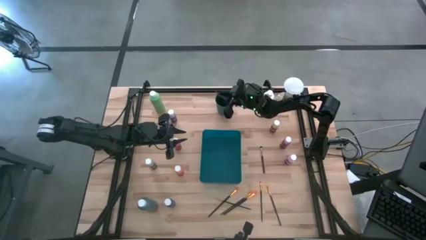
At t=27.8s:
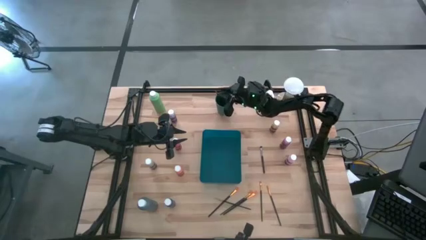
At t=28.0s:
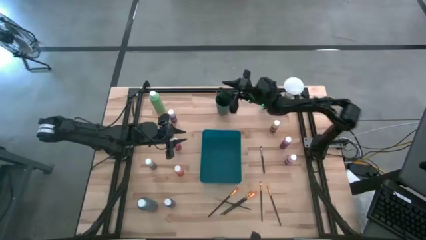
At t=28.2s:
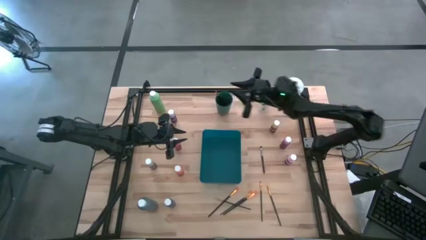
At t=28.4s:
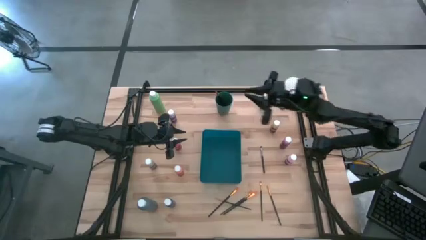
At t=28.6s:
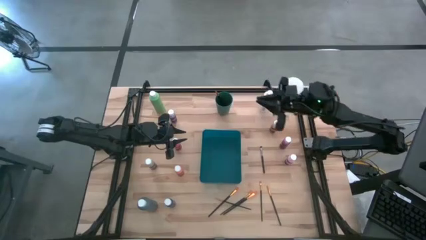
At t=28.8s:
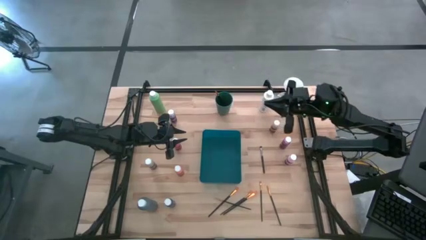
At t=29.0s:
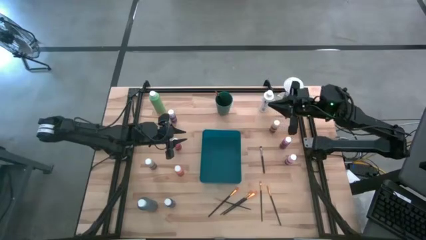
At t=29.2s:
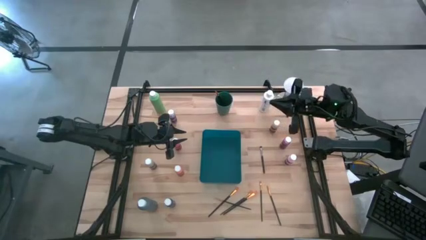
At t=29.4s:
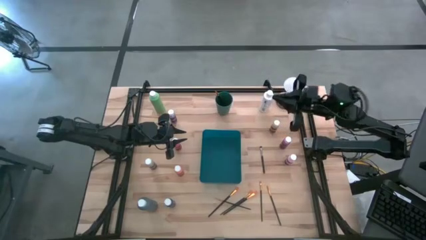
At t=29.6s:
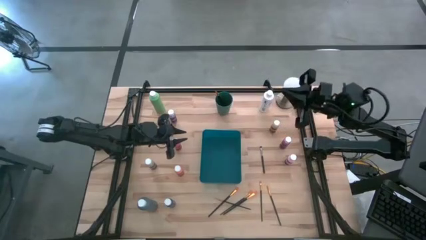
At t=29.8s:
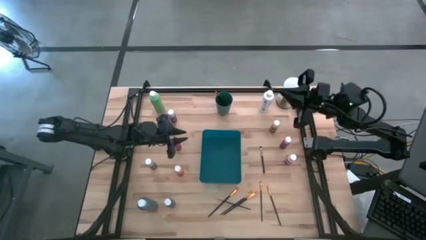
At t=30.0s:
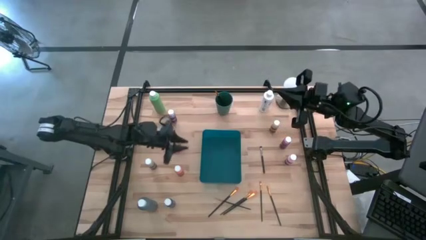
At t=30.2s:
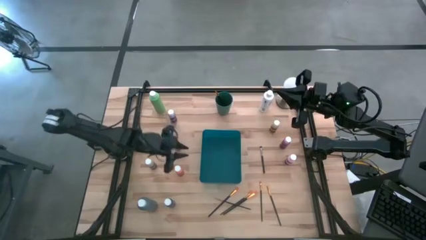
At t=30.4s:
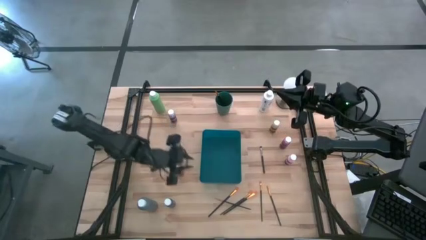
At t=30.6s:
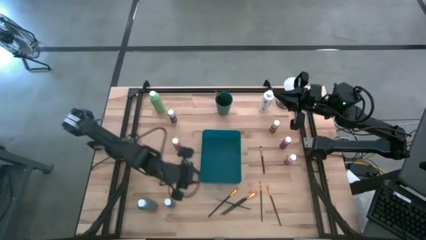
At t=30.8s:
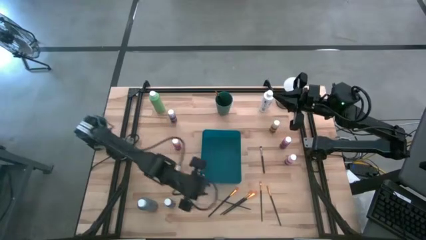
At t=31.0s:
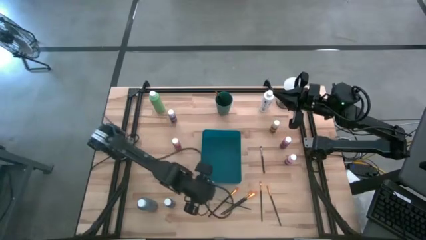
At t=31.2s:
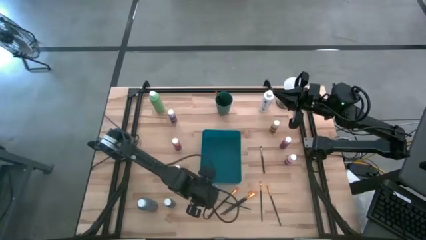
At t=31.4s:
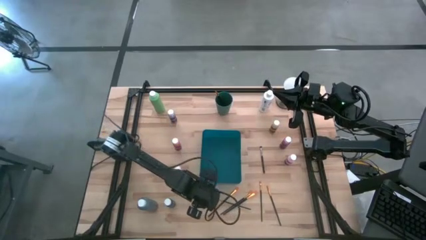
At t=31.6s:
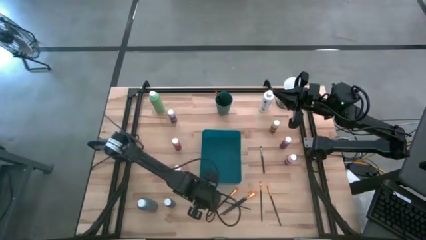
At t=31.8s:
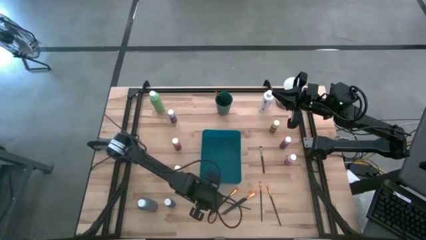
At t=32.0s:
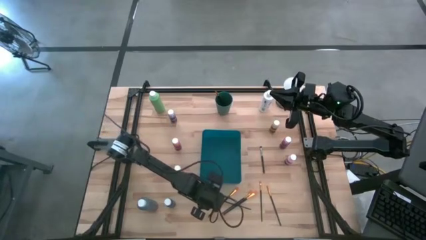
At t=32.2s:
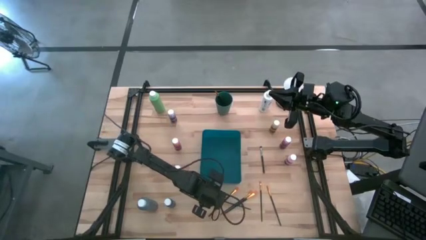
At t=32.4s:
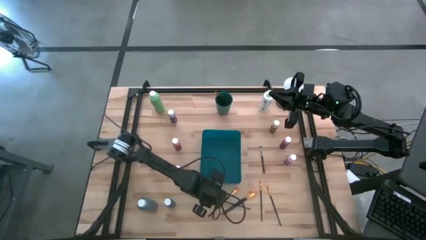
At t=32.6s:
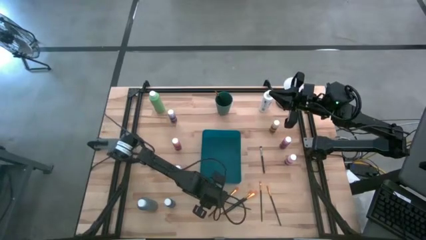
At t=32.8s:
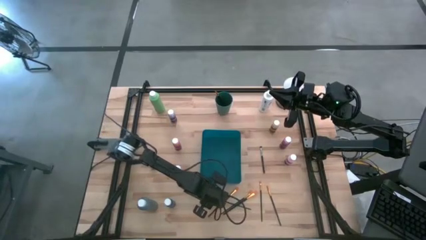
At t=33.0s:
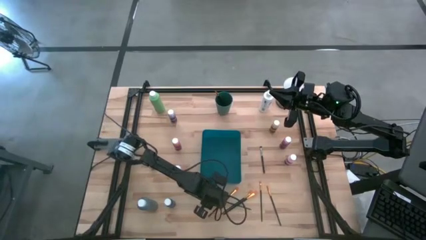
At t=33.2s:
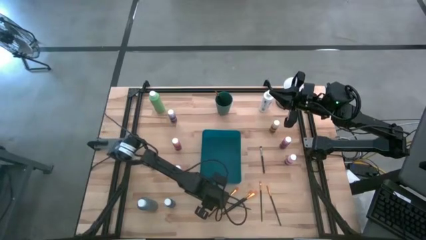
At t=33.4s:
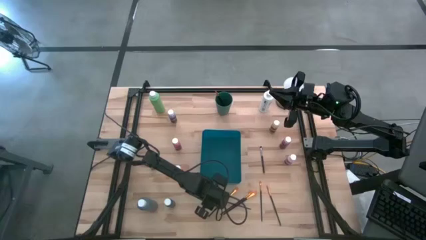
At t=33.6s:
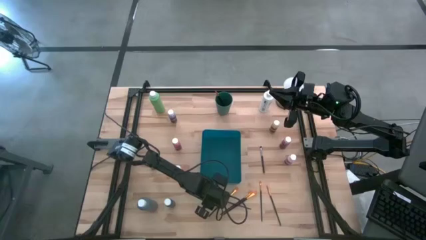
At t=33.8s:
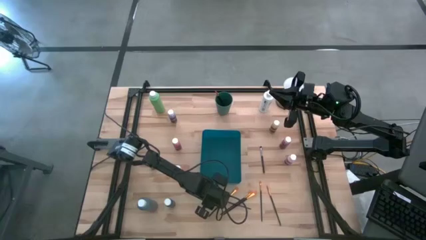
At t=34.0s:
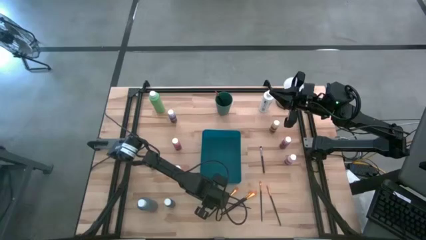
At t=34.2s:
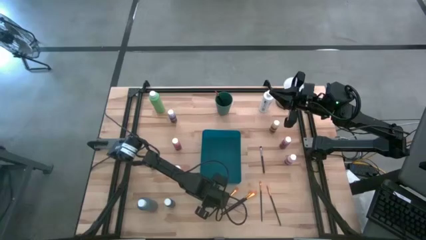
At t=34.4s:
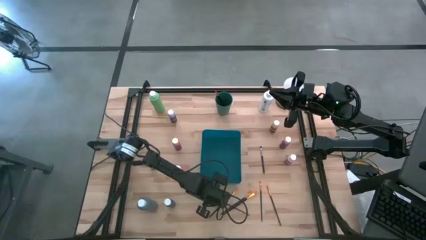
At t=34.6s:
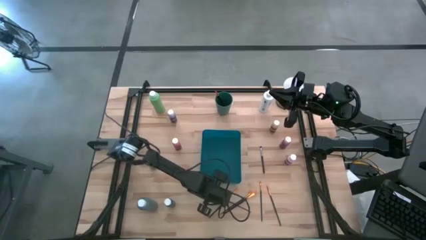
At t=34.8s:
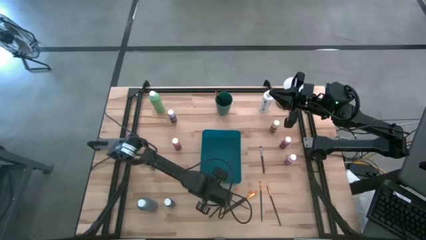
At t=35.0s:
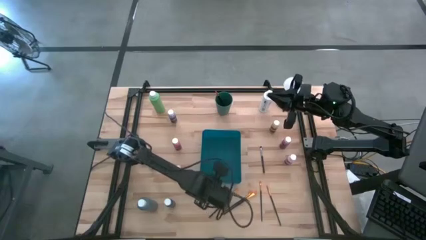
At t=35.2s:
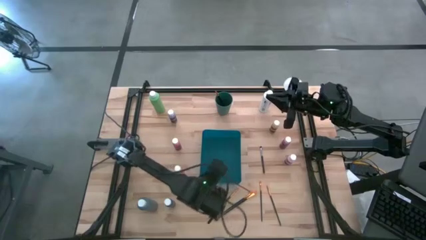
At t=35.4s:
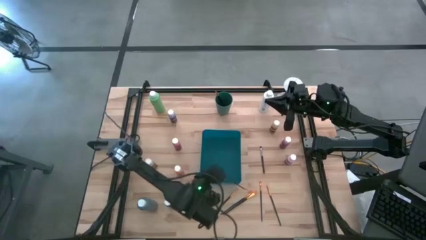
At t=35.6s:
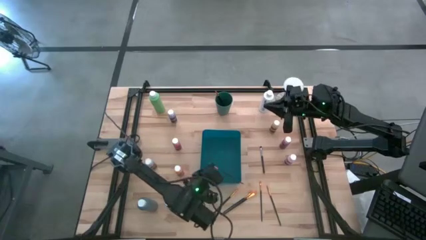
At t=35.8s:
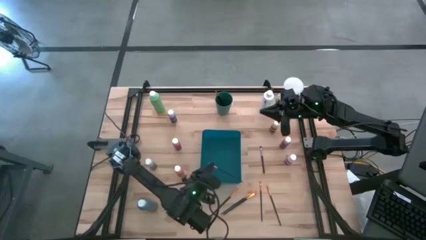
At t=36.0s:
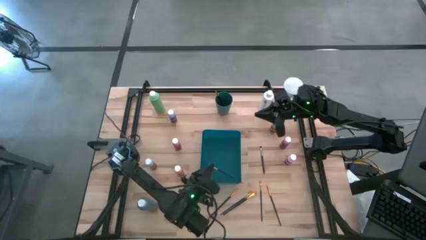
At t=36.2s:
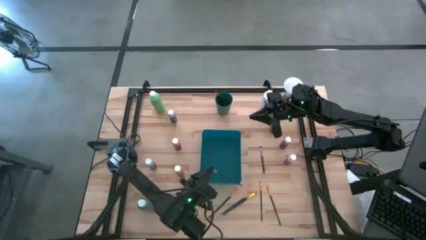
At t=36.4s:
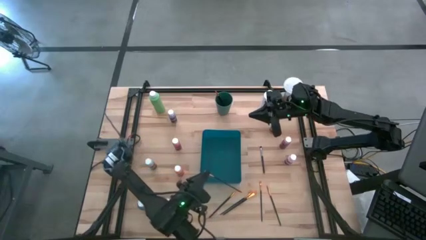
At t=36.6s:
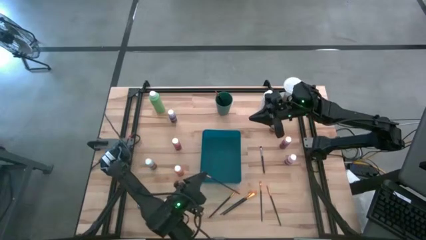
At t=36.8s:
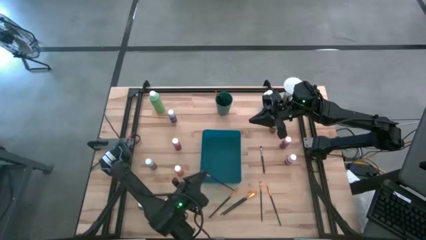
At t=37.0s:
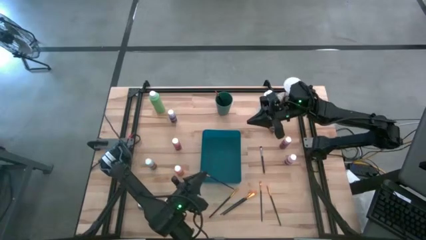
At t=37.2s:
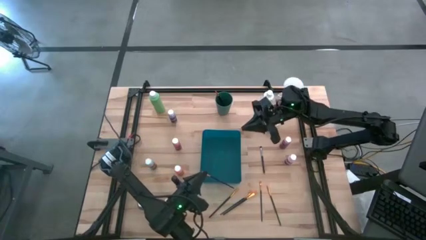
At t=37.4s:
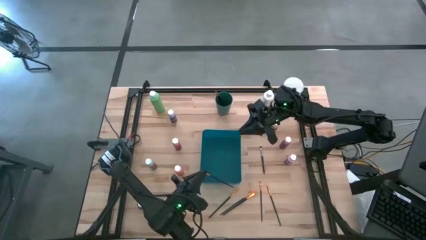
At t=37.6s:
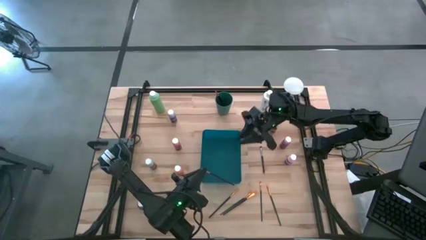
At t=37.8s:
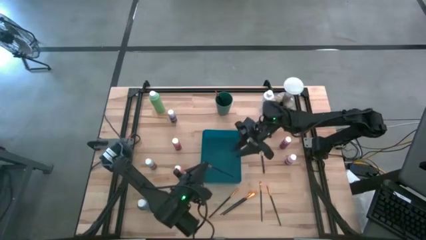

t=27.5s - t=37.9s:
Task: Pick & Place Paint Supplies
Put the gold paint brush into the green cup

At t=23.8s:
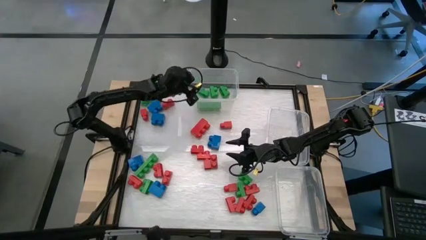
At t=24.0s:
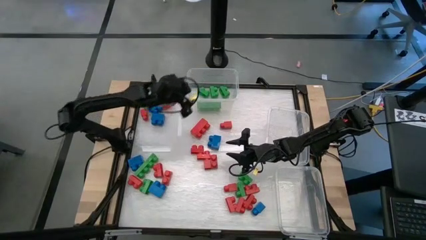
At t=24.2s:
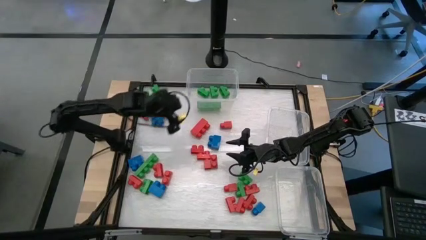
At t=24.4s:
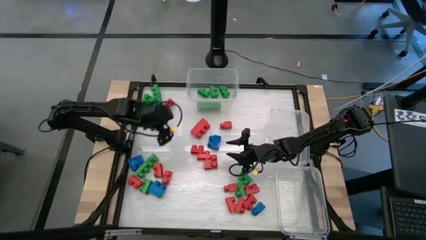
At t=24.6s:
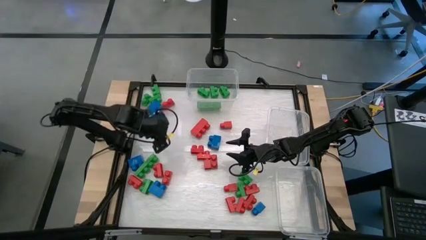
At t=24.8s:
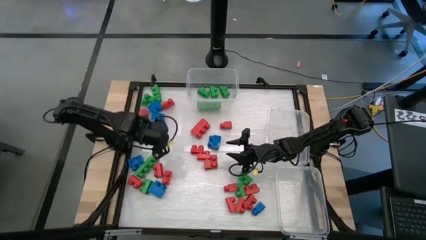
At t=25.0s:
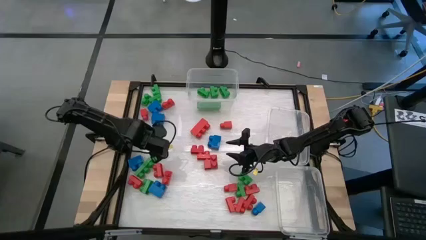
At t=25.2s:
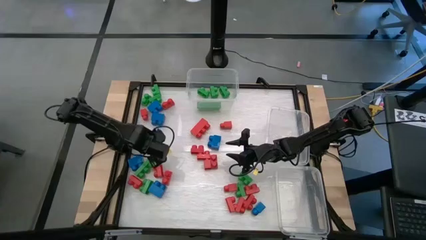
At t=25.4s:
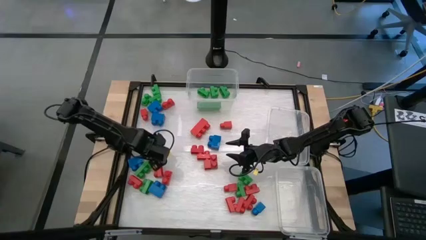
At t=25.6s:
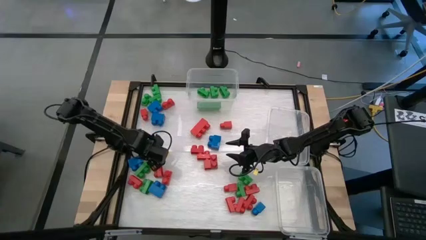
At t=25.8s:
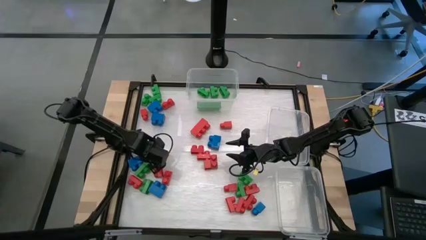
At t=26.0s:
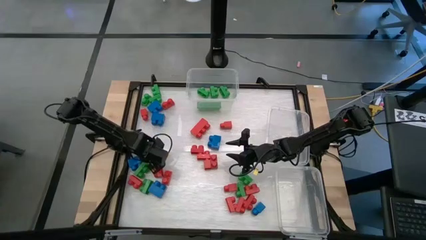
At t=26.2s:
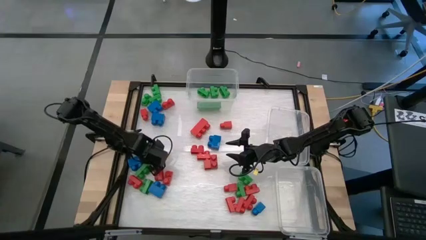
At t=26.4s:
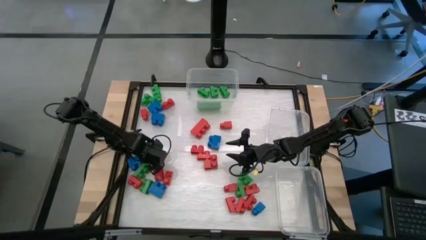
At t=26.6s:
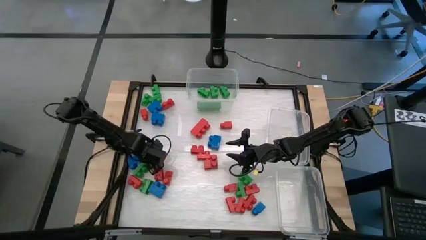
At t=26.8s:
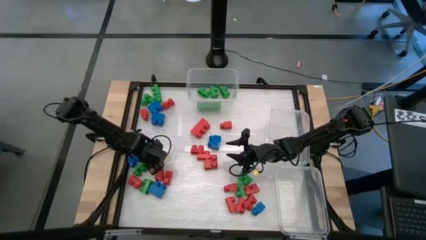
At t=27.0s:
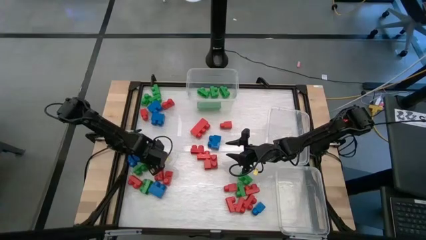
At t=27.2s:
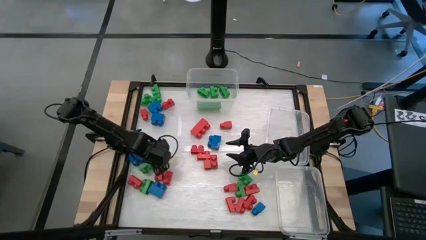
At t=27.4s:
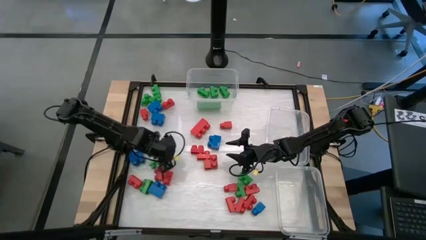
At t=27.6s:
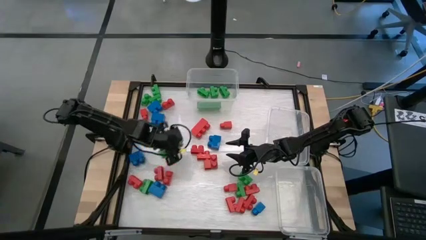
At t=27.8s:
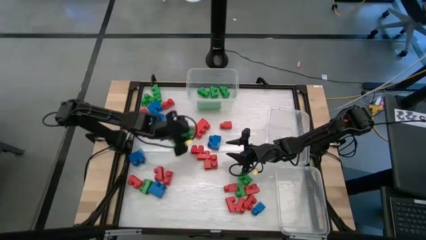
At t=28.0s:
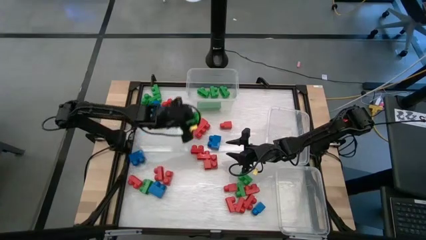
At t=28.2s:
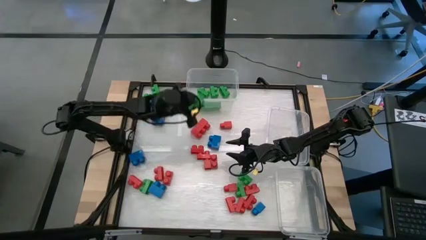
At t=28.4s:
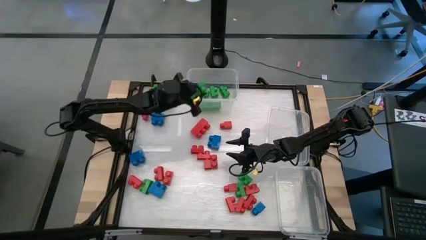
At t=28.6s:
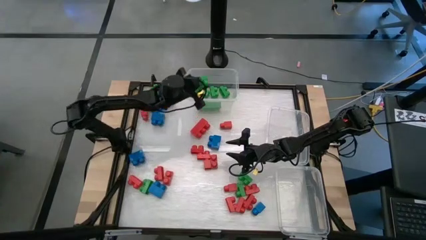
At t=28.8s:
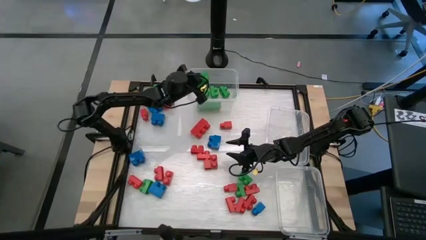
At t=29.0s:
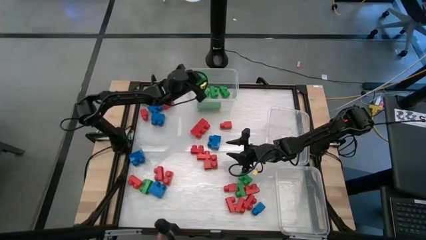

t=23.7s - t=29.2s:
Task: Sort blocks
Put the green game piece into the top transparent bin
